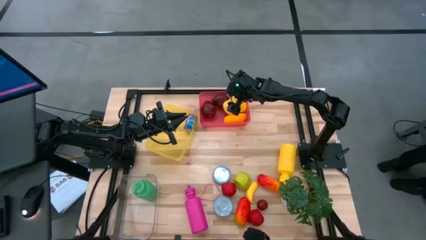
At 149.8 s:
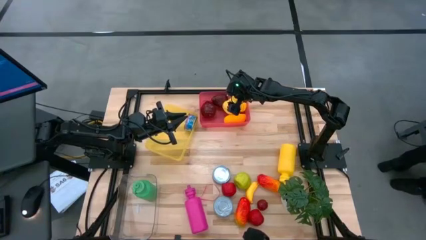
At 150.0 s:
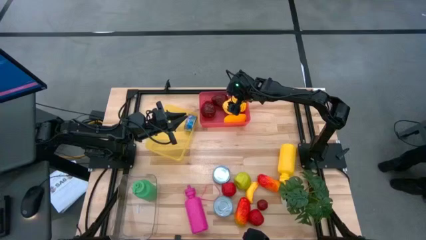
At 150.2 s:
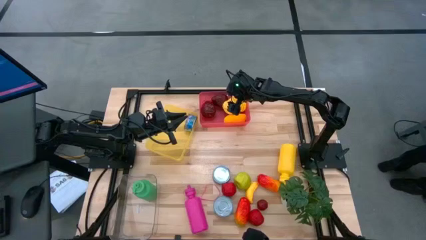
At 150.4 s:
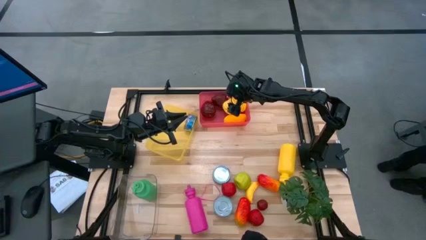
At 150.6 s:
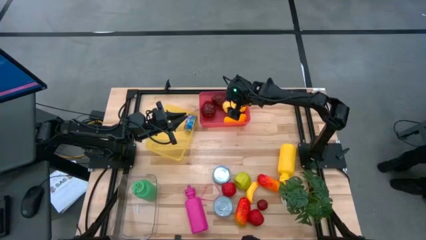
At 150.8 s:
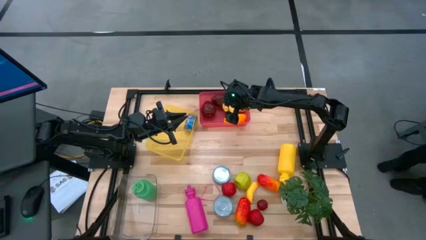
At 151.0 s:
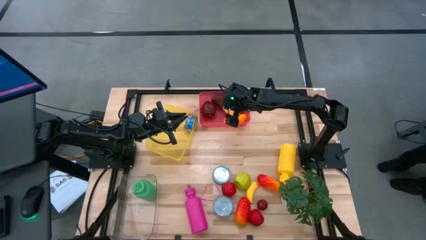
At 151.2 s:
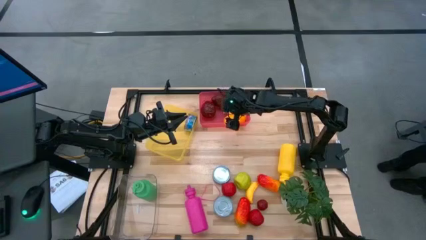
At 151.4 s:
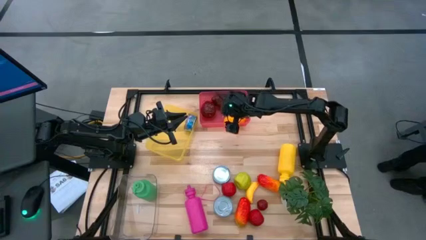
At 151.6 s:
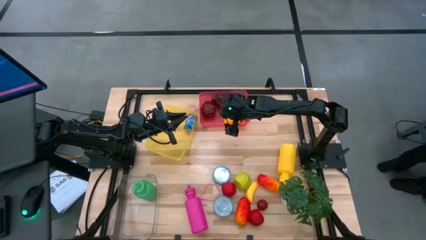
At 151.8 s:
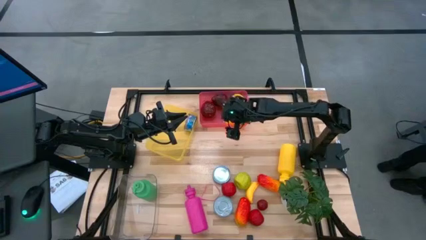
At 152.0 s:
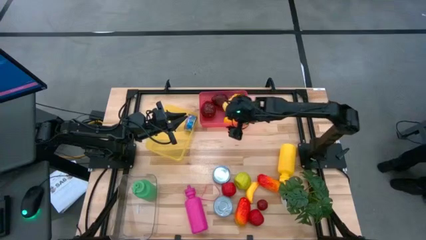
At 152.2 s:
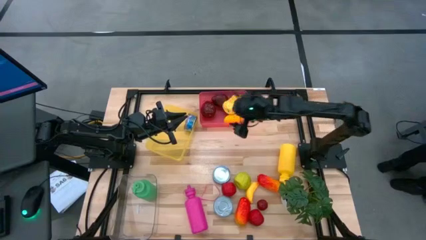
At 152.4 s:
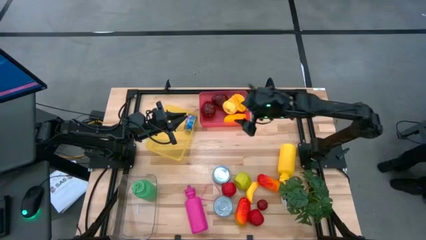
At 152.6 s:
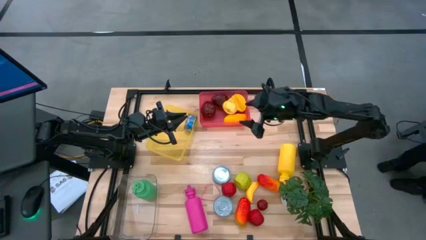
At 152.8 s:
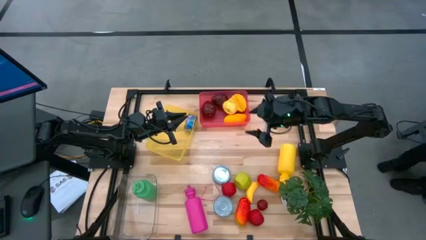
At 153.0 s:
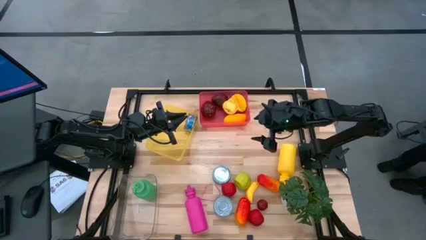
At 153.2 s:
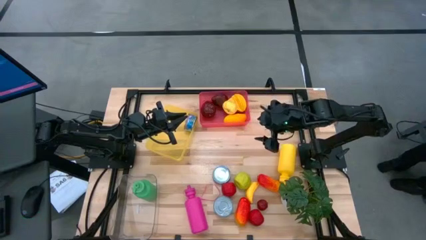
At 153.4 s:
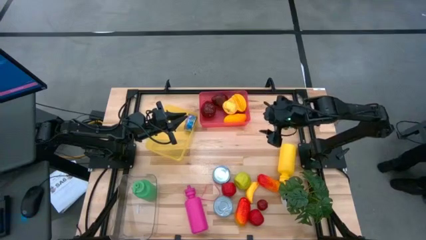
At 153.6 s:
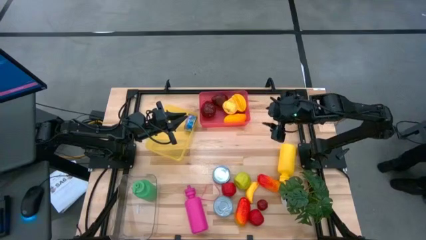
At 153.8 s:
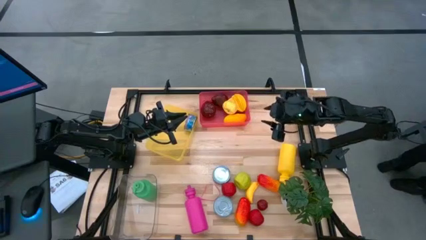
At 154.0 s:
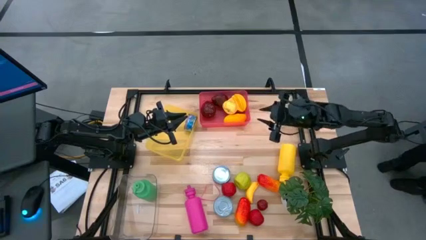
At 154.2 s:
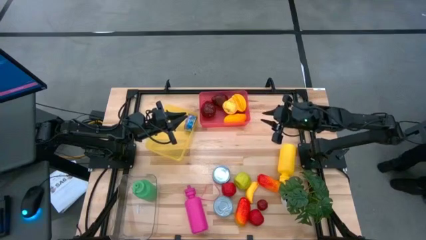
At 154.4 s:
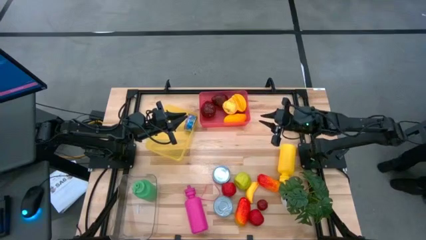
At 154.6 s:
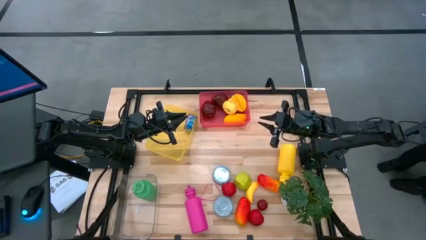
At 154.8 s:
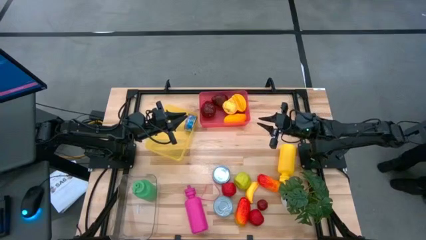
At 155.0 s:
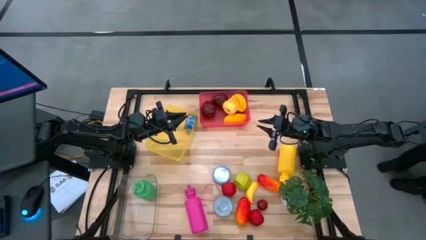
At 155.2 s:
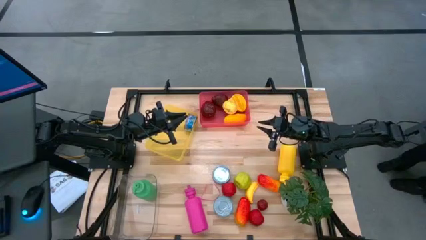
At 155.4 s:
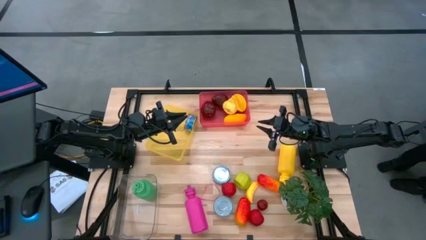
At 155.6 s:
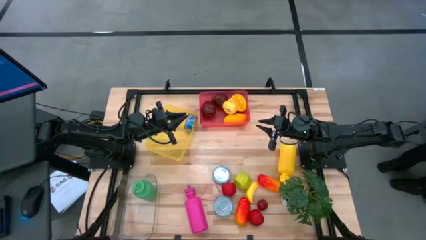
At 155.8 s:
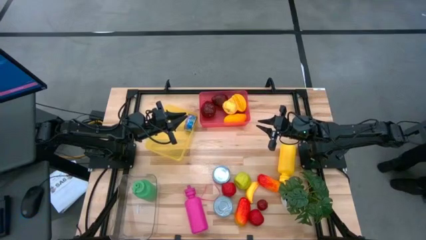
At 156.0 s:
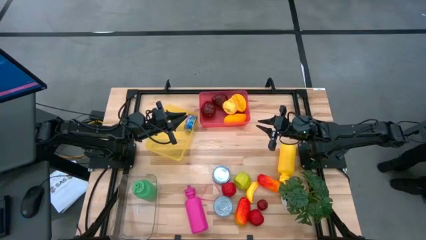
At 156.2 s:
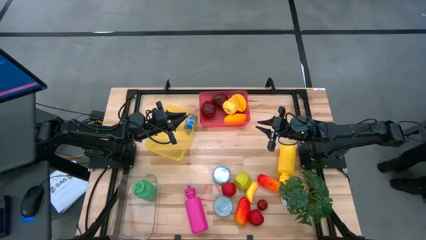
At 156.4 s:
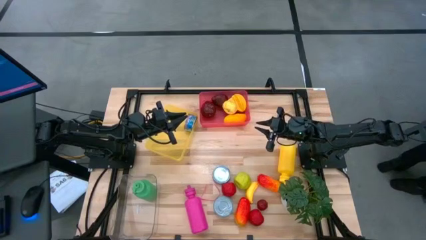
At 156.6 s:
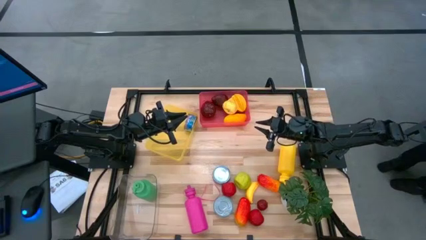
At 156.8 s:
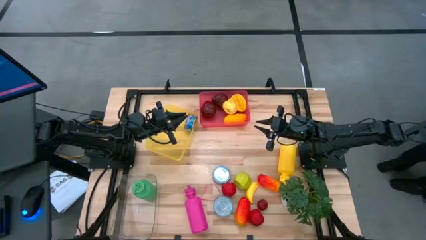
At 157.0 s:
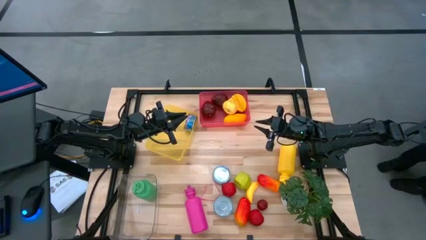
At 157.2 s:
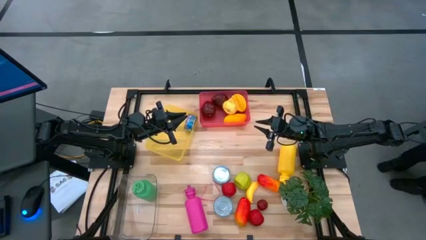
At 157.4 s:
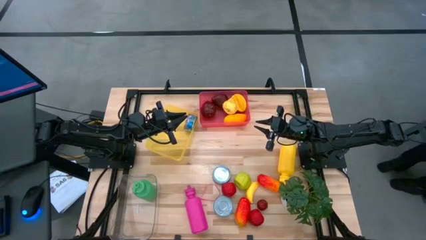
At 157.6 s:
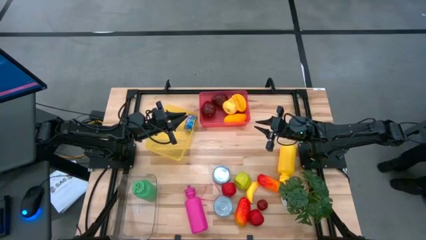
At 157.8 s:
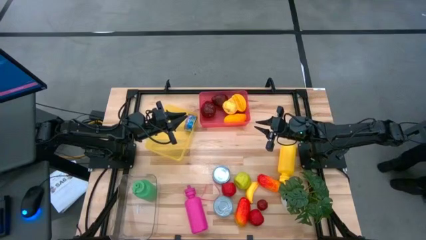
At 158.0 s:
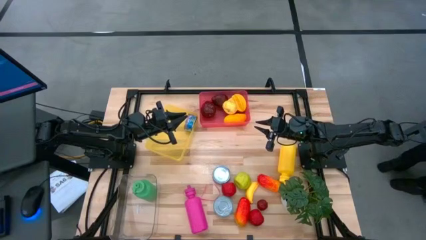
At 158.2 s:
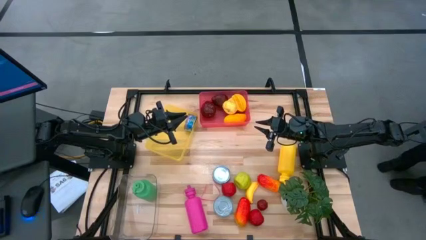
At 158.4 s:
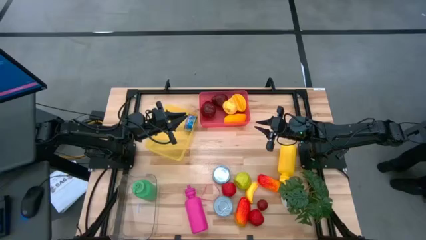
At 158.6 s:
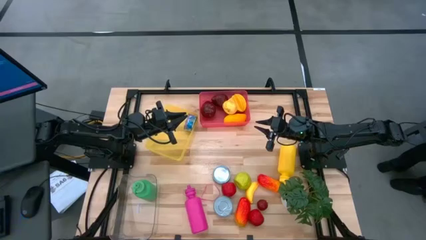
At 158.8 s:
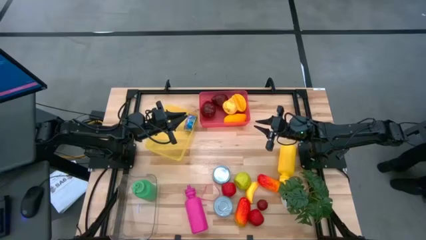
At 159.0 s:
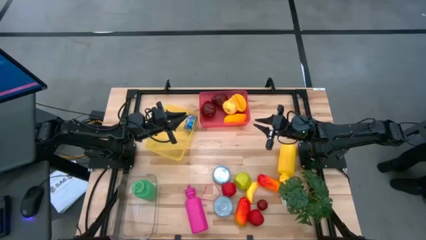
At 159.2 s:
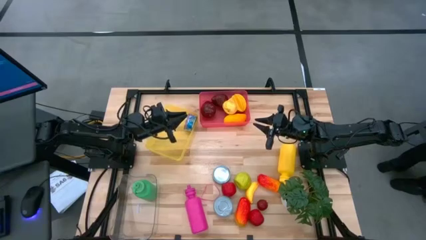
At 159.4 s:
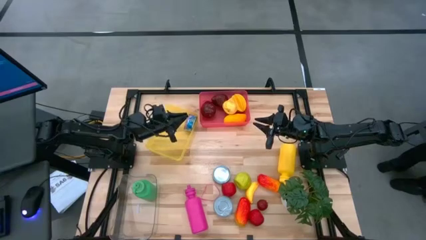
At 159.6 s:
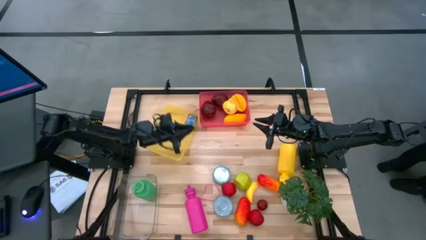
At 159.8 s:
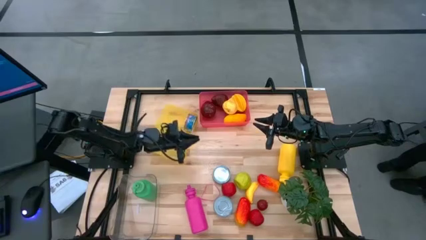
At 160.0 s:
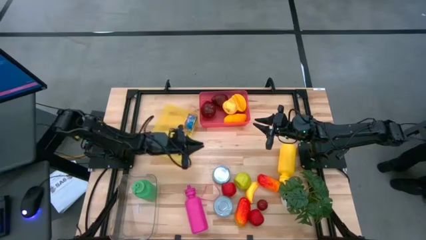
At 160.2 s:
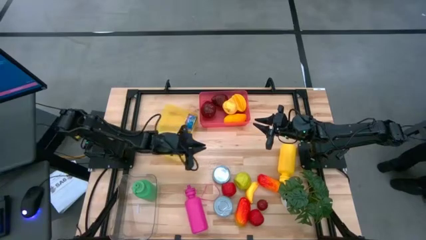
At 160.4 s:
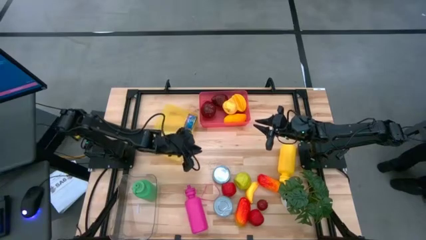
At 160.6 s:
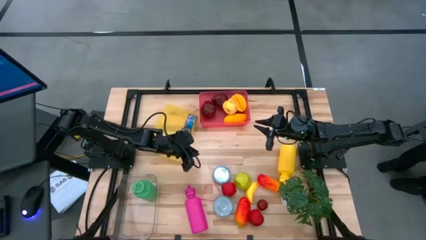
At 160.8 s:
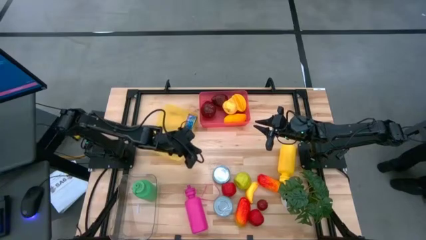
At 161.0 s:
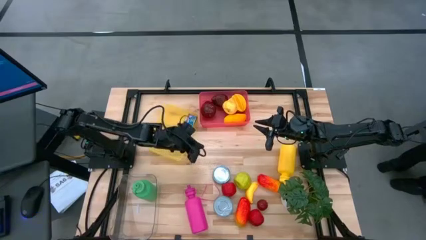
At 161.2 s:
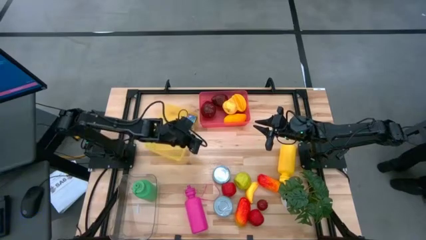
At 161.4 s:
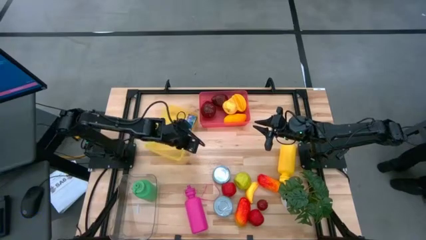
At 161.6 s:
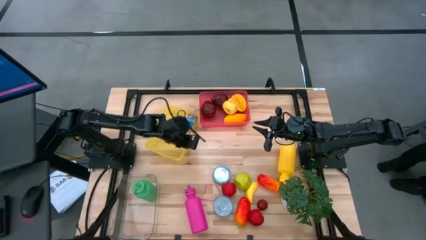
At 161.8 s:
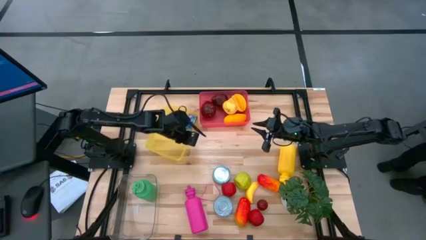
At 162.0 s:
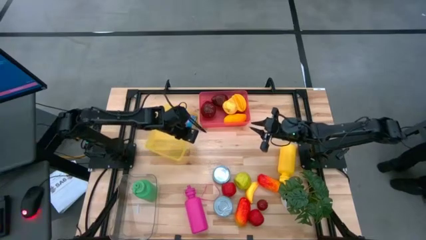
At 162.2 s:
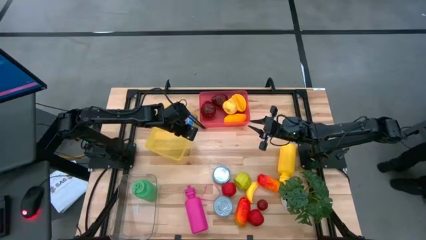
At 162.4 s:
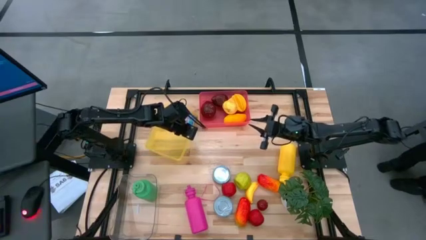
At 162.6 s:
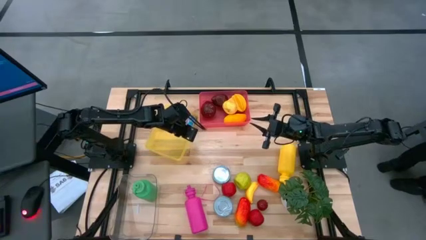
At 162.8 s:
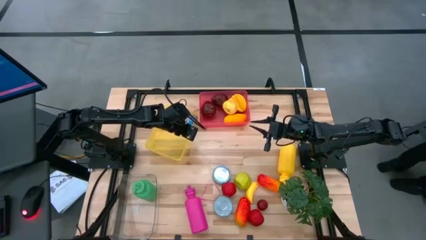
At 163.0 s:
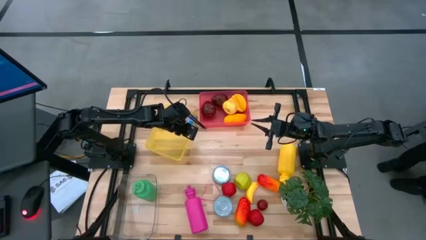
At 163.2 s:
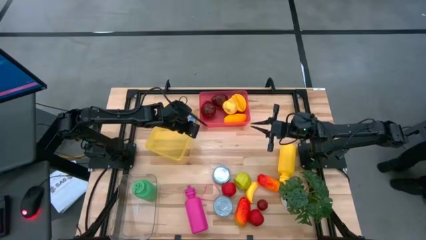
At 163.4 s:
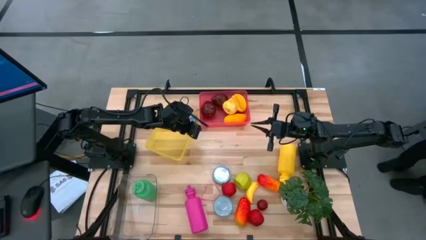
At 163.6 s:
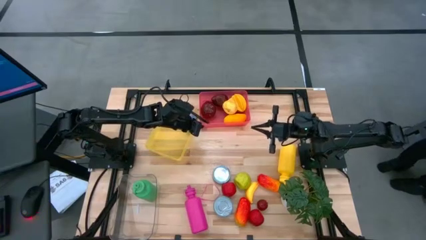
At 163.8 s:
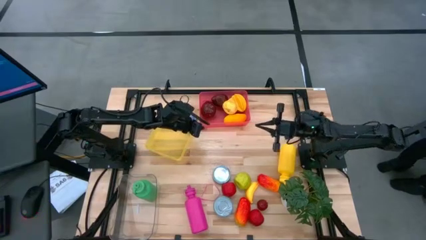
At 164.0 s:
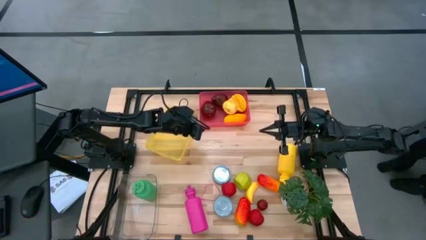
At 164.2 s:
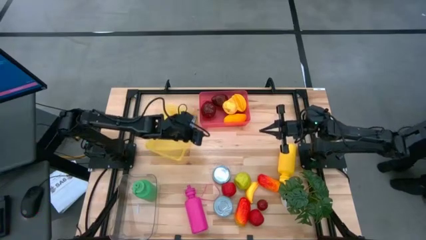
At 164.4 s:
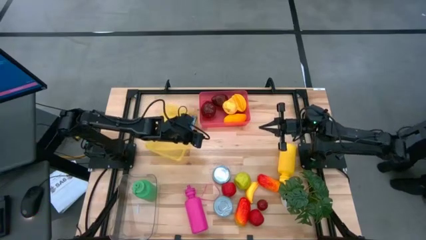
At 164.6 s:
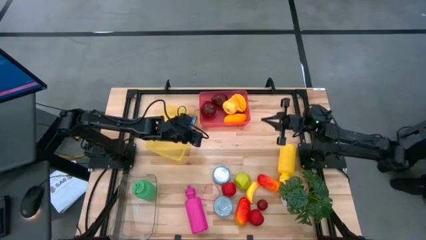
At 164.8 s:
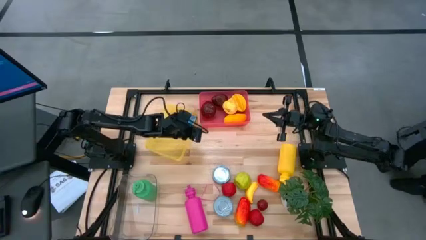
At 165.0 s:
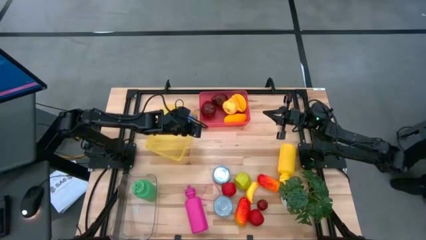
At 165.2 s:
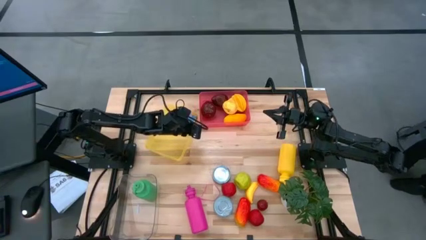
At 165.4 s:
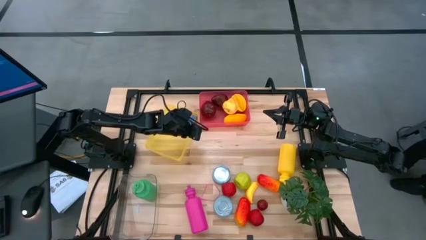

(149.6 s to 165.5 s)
Task: Pick & Place Food Item
Put the pink water bottle into the transparent bin
